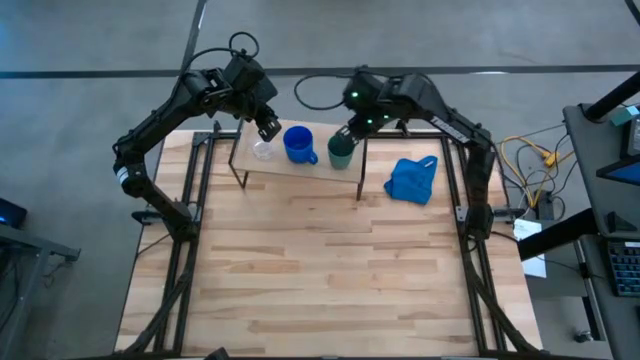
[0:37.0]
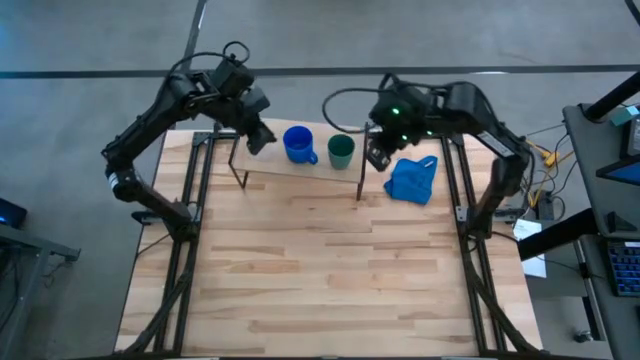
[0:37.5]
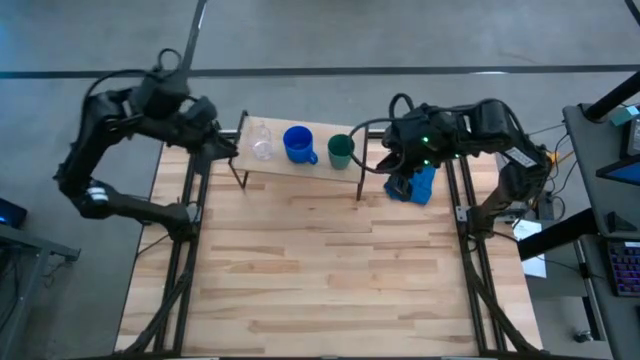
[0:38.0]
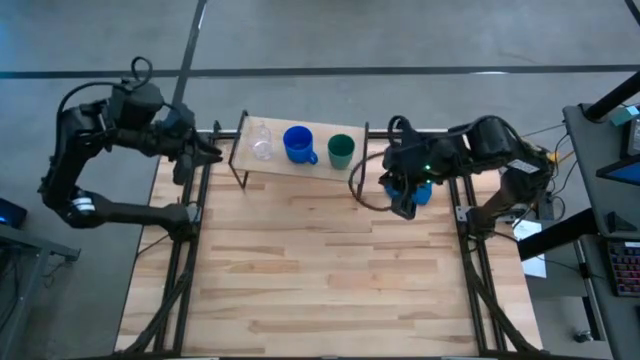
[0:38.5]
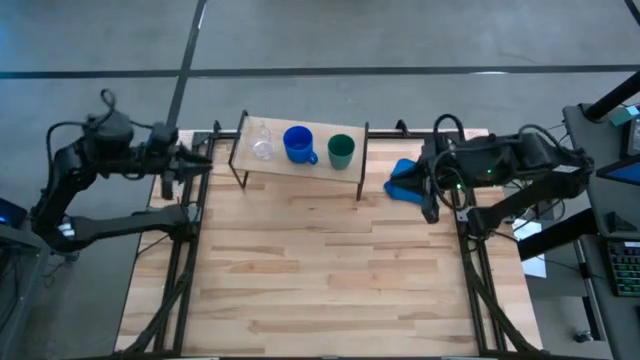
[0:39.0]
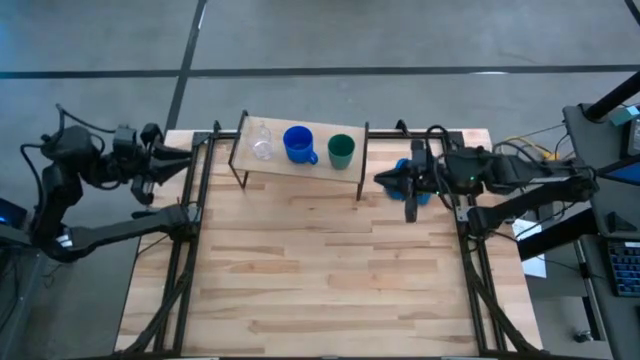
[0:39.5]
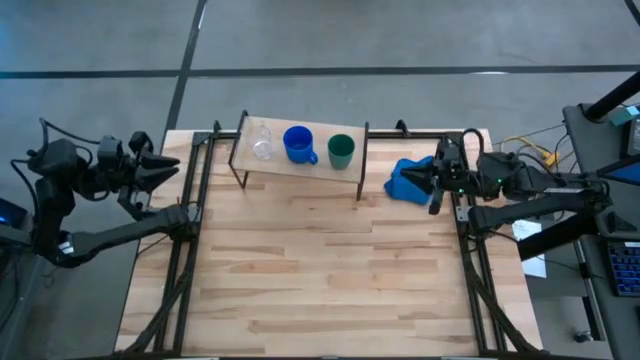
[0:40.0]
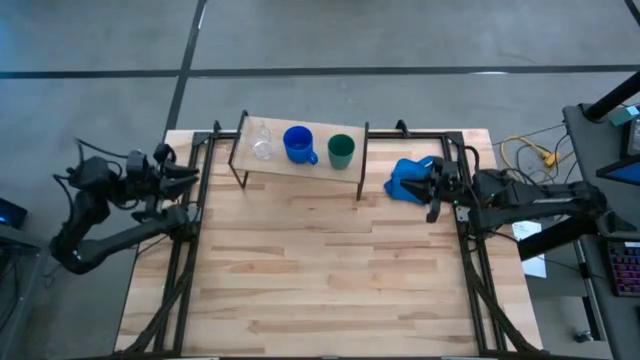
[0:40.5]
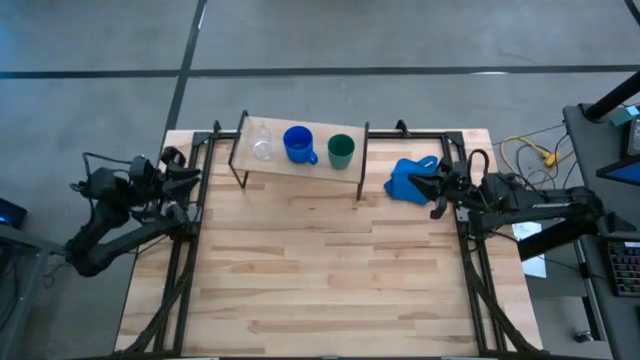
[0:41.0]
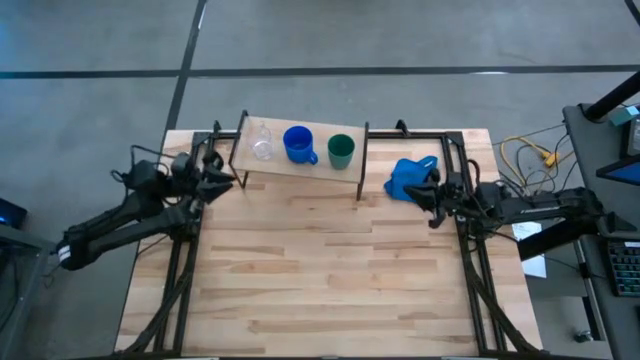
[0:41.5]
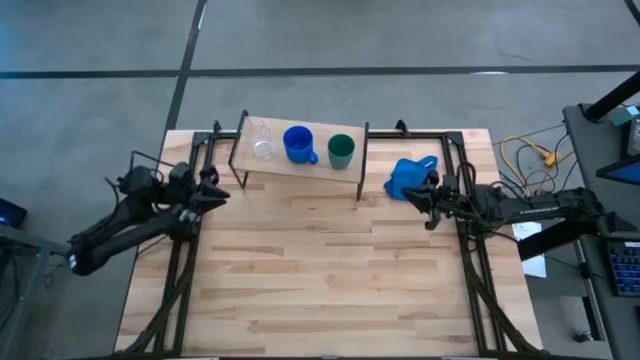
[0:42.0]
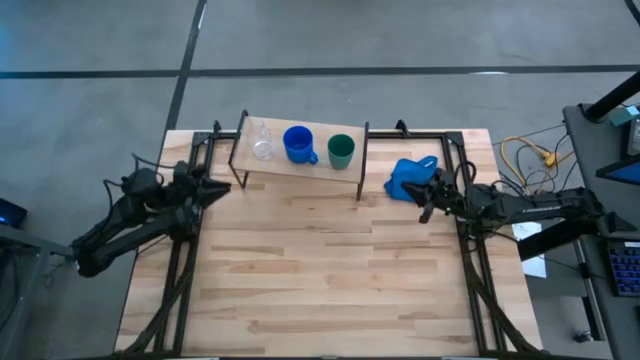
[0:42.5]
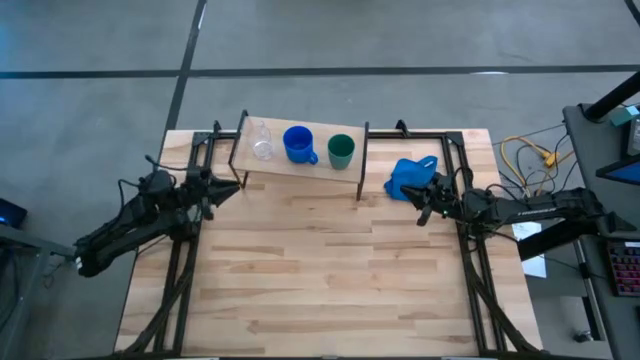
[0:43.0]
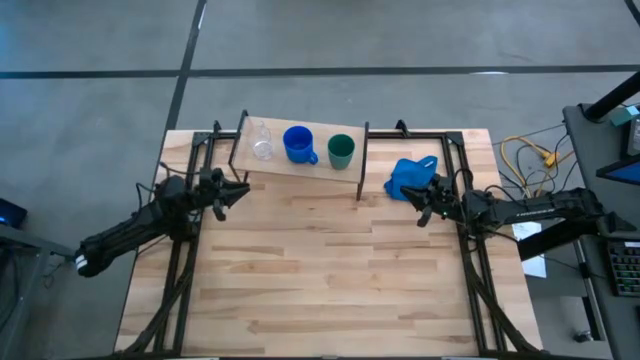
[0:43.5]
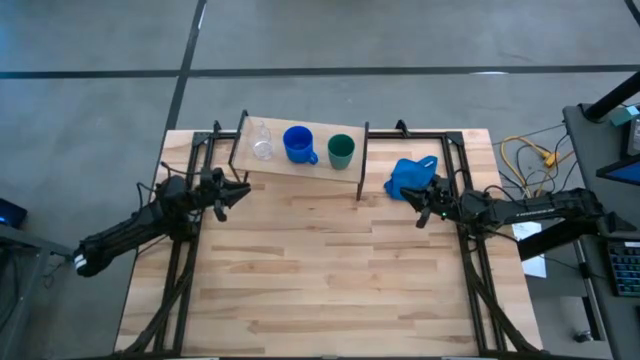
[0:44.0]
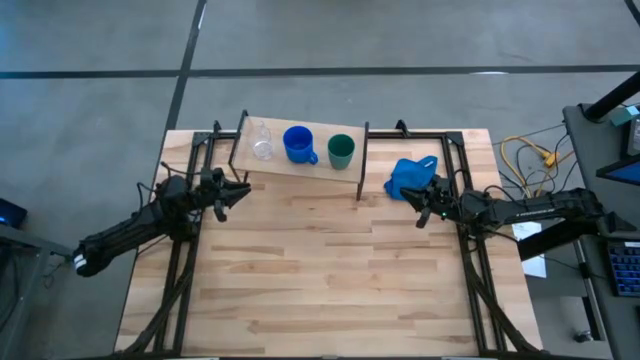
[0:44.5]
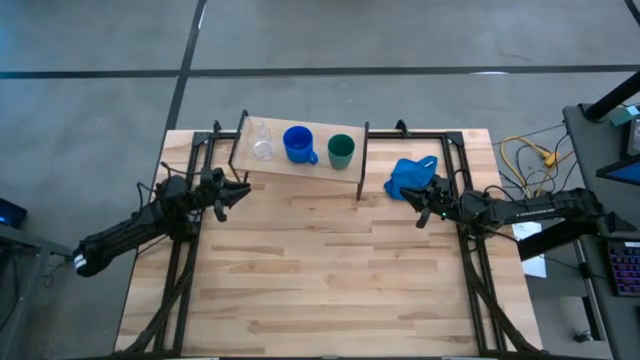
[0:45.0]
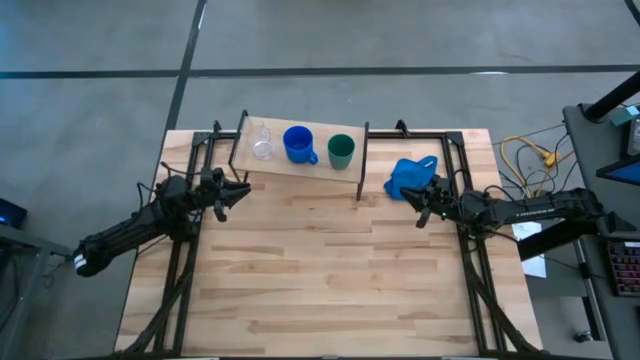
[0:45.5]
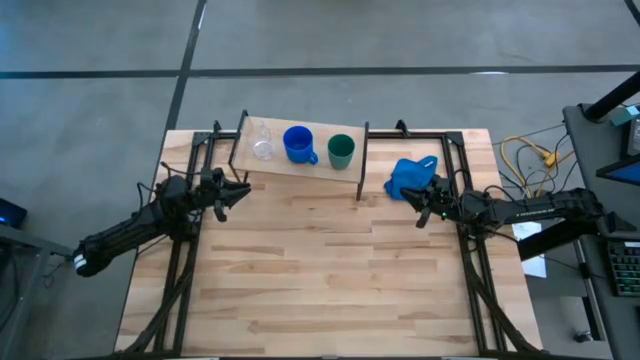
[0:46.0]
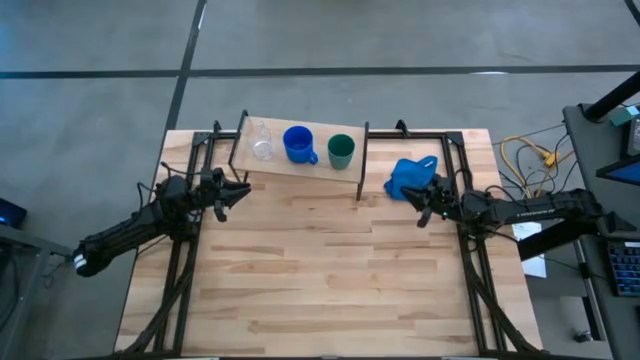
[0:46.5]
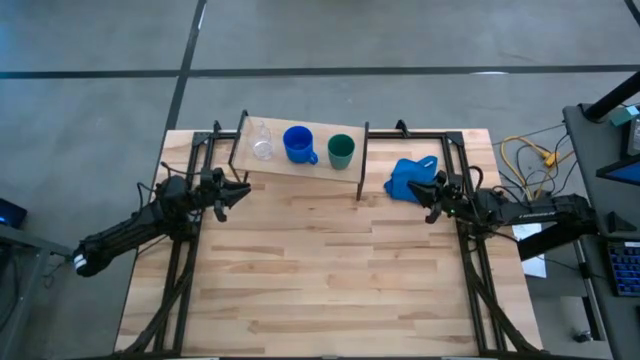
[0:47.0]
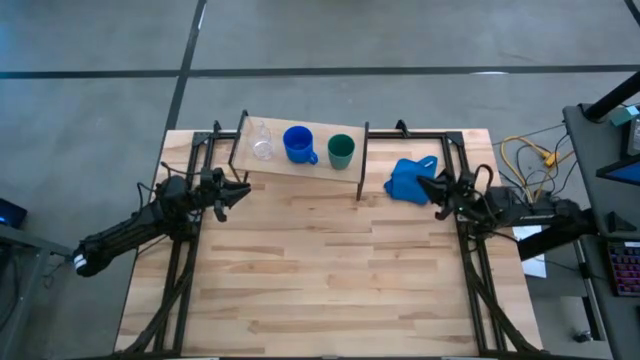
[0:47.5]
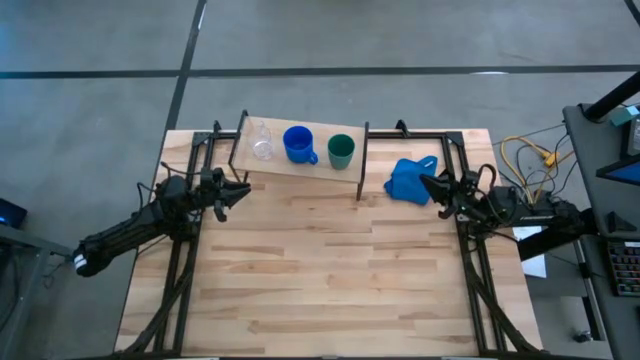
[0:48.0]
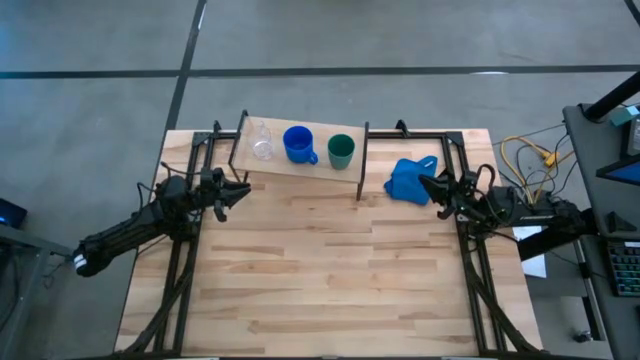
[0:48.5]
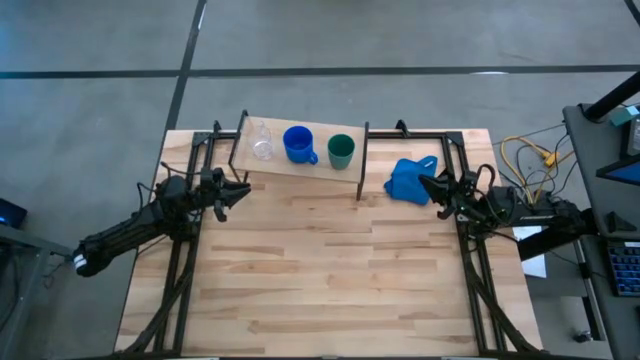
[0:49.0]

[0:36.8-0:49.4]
Task: Stack small to large cups/mugs on shelf
Return to Home Position

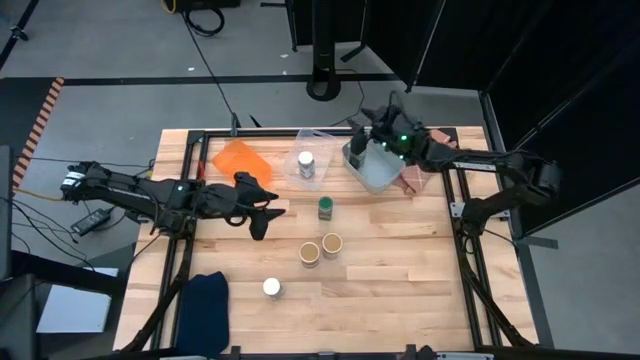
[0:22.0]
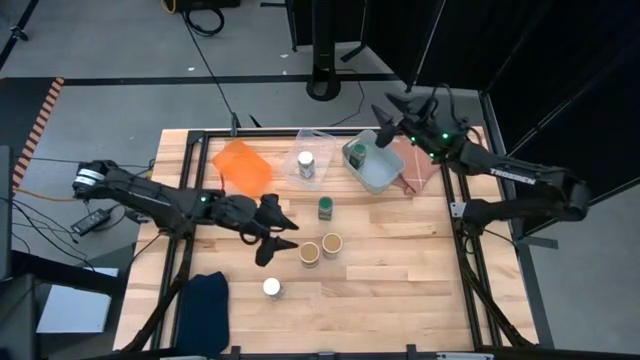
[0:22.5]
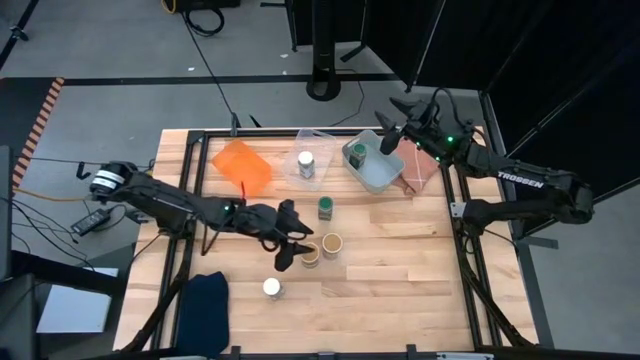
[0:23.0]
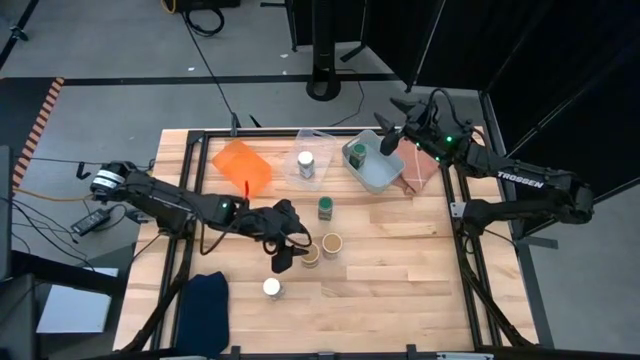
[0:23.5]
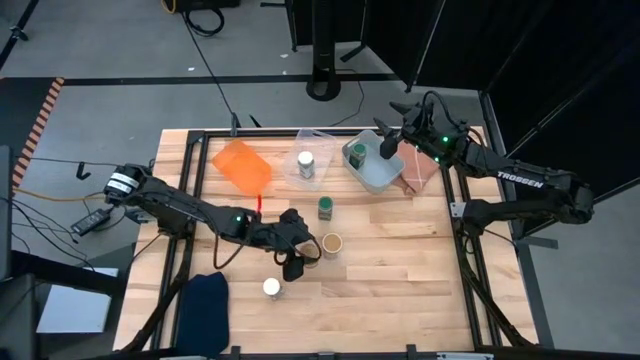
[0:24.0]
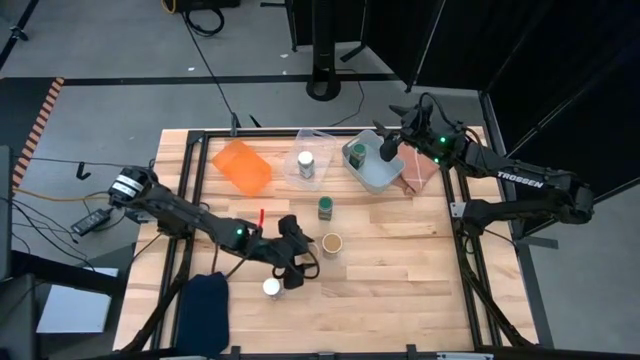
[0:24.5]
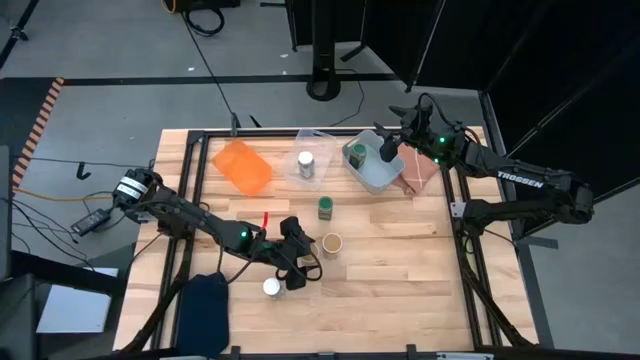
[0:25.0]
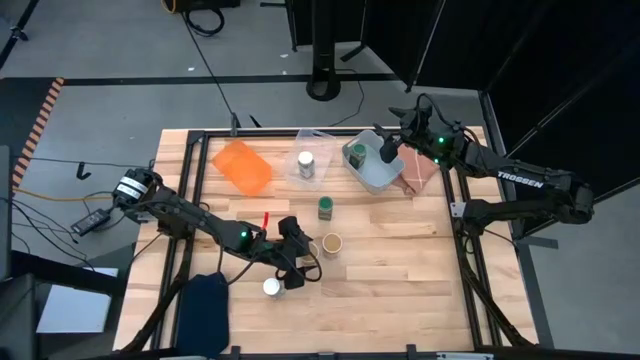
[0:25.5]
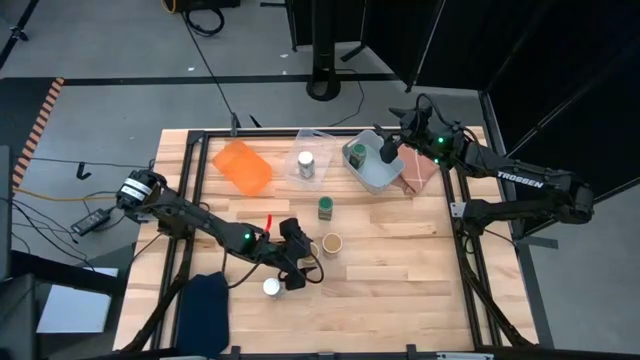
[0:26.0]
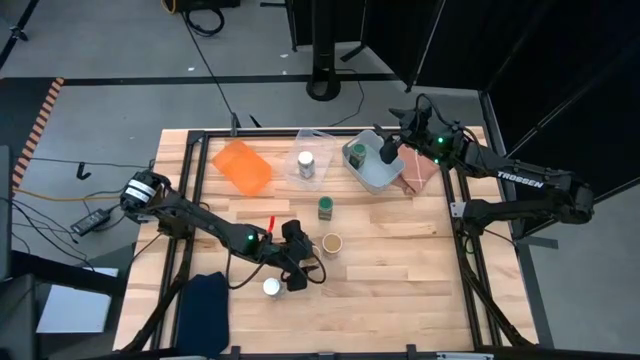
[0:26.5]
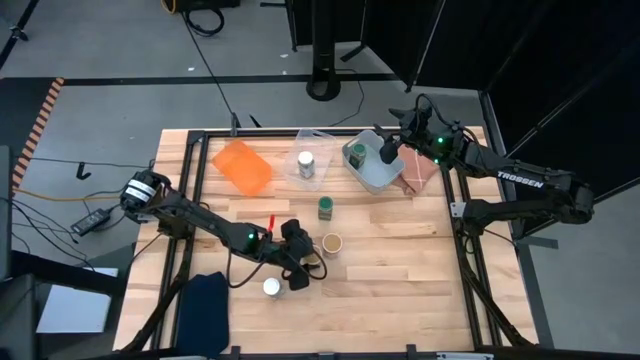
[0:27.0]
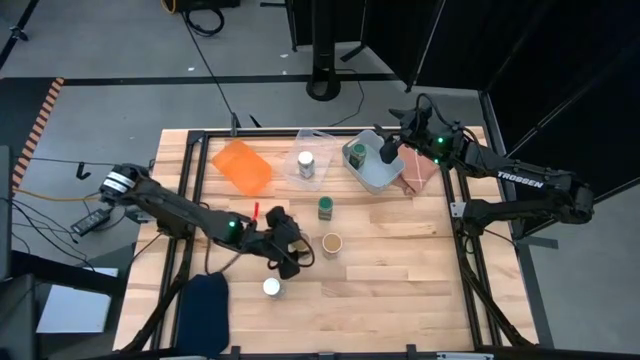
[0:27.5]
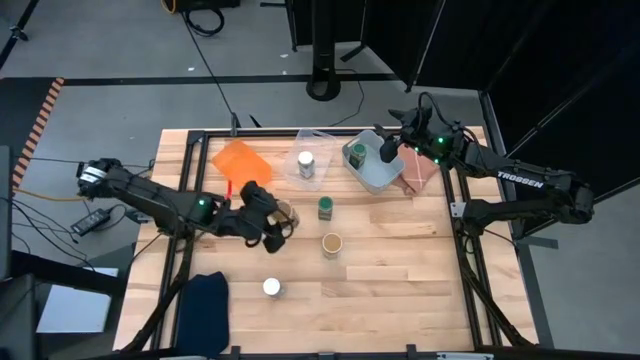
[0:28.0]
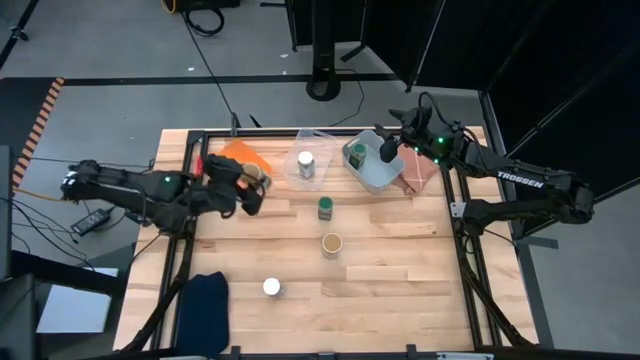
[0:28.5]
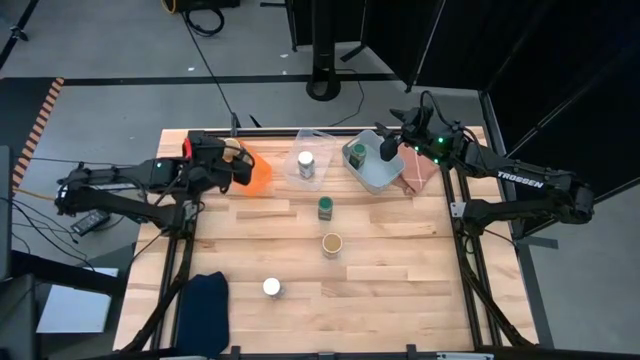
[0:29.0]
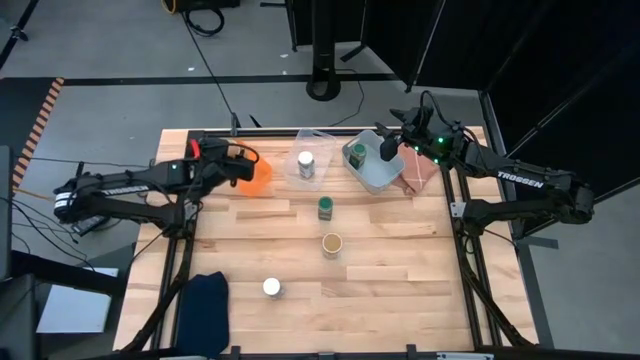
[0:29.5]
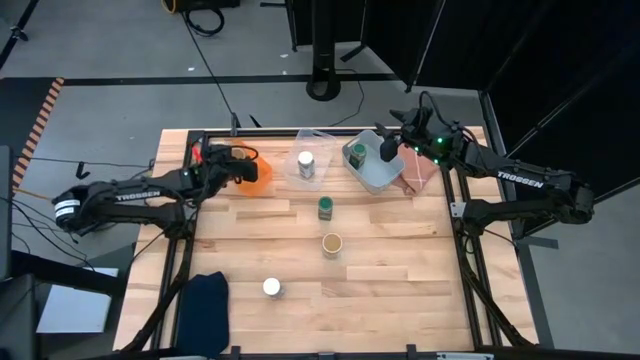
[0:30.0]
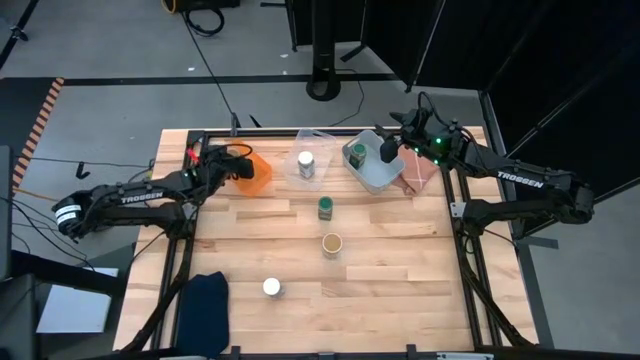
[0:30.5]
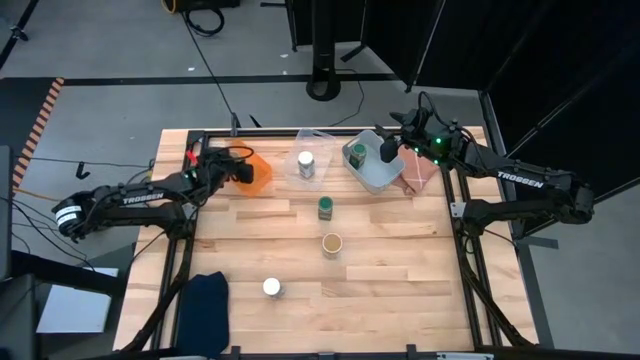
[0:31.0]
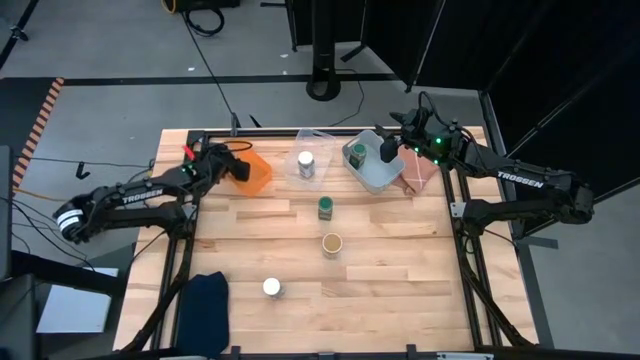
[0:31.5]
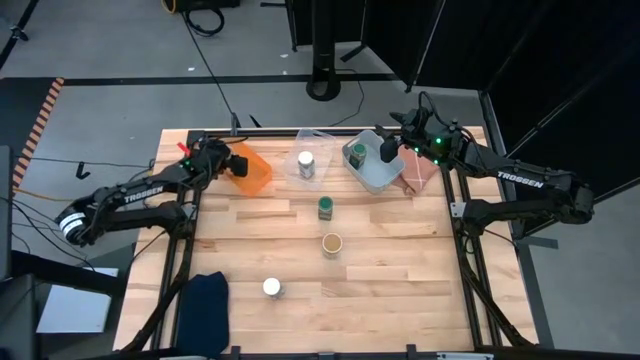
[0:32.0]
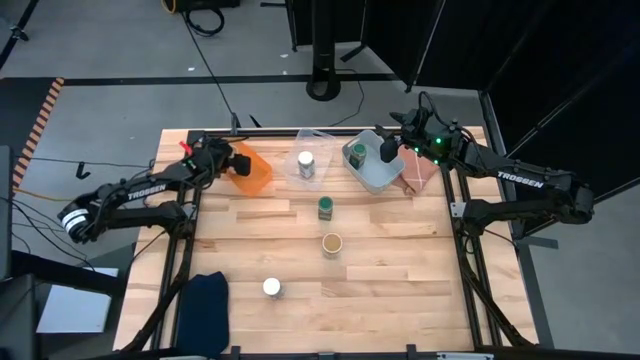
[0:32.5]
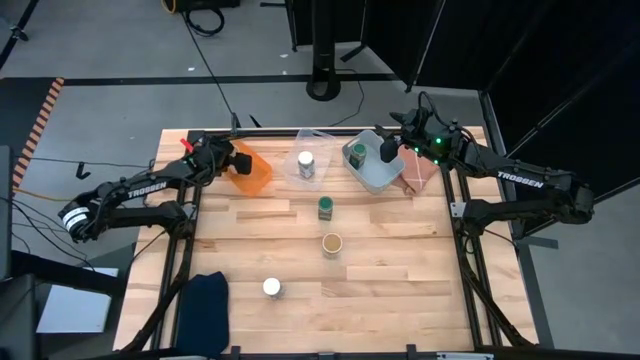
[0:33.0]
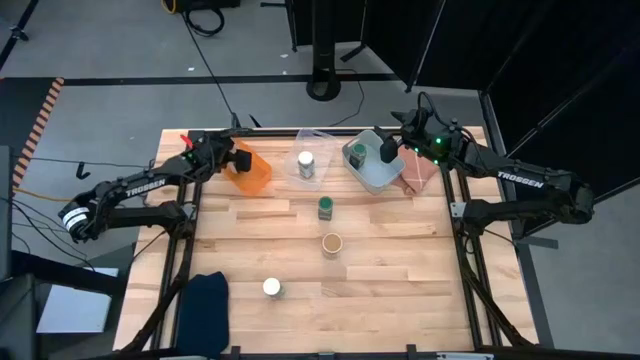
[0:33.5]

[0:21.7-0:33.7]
Task: Sort spices by type
Put the left gold seasoning bottle into the orange bin
